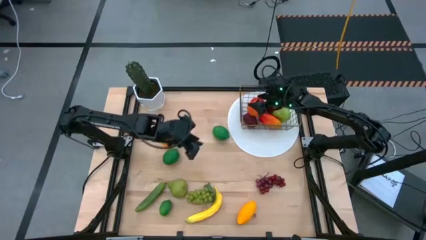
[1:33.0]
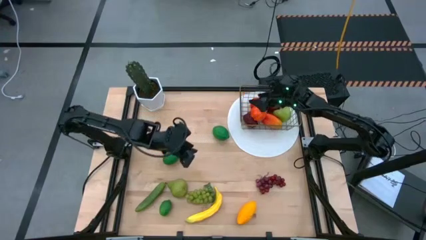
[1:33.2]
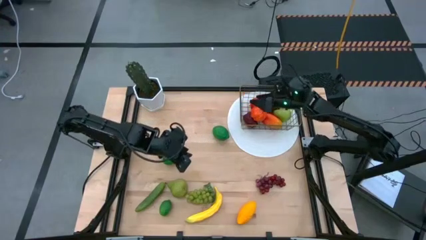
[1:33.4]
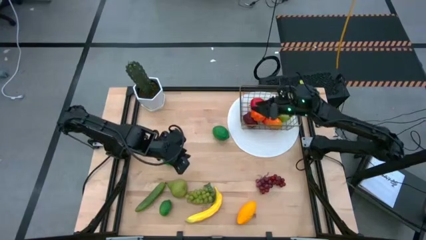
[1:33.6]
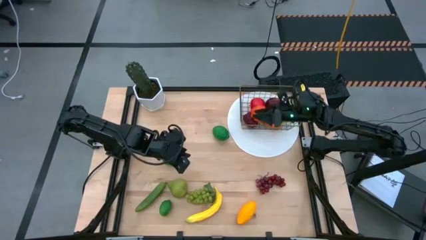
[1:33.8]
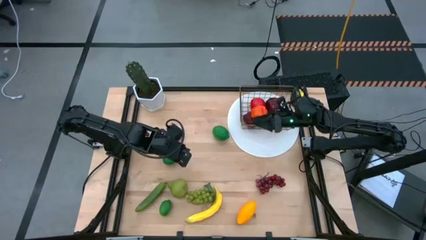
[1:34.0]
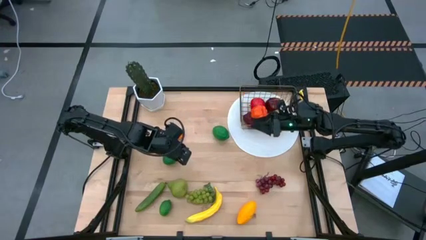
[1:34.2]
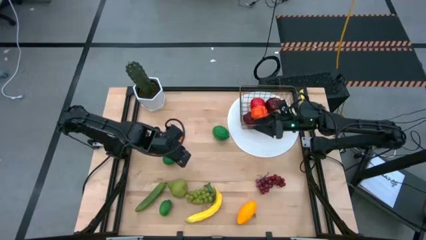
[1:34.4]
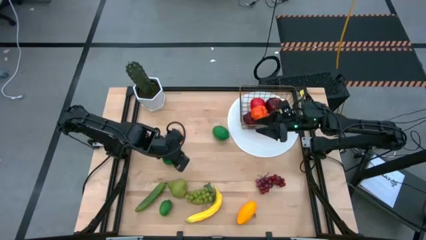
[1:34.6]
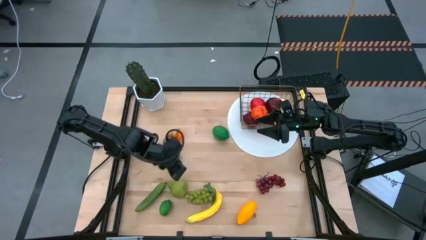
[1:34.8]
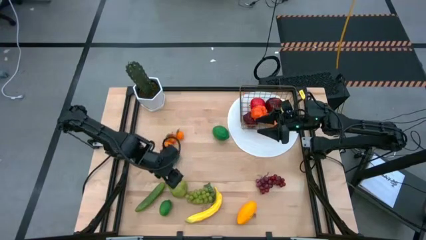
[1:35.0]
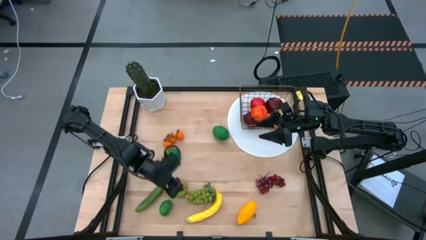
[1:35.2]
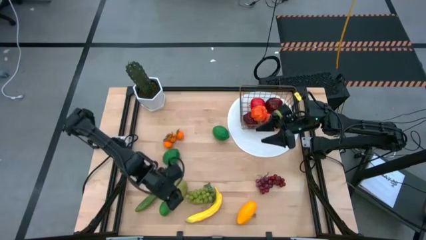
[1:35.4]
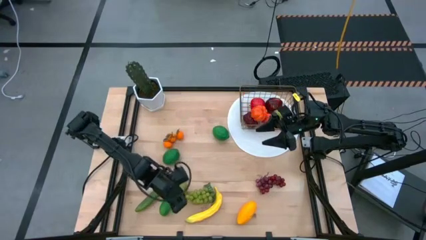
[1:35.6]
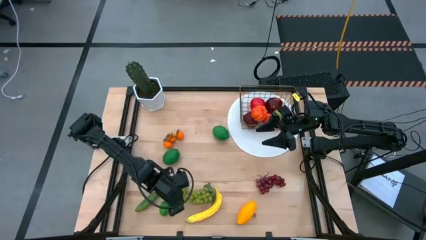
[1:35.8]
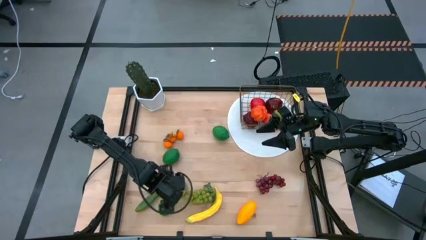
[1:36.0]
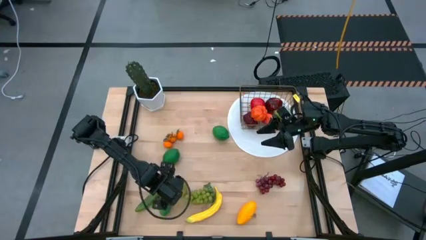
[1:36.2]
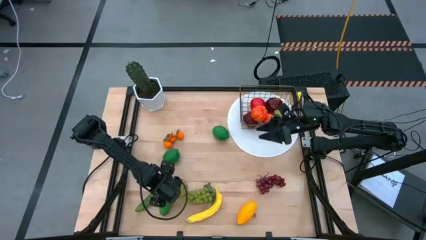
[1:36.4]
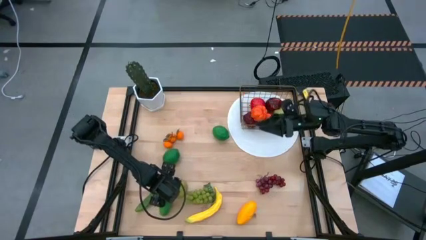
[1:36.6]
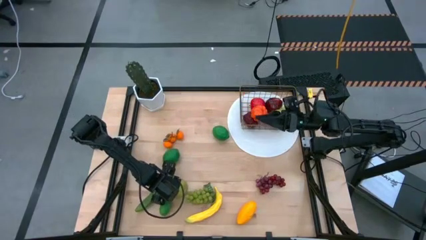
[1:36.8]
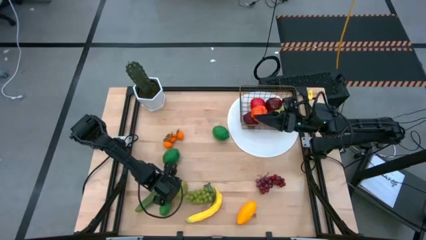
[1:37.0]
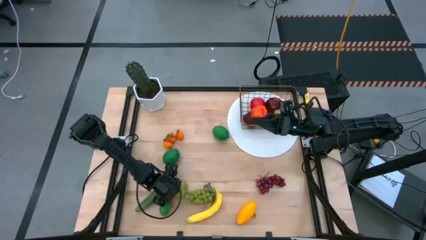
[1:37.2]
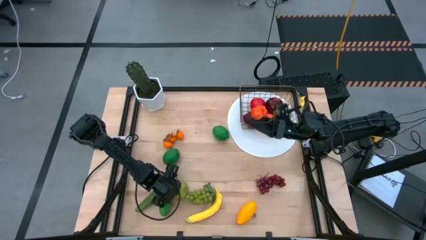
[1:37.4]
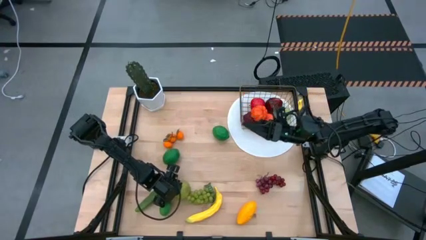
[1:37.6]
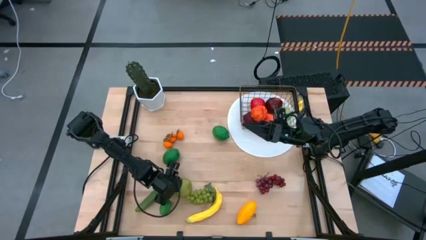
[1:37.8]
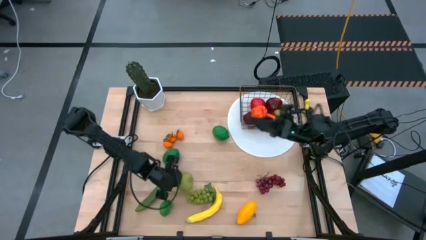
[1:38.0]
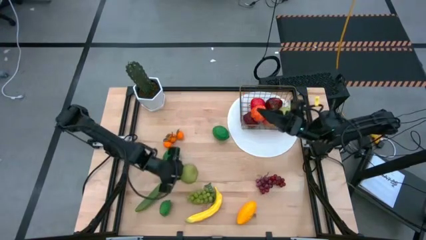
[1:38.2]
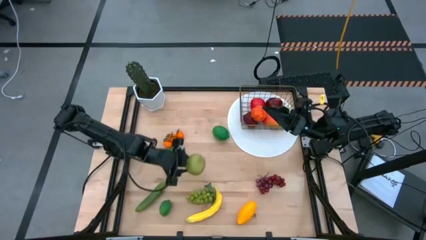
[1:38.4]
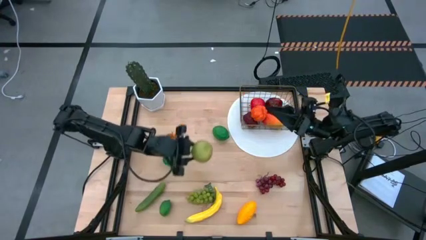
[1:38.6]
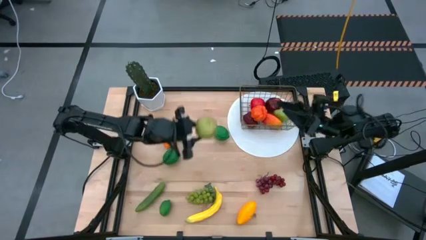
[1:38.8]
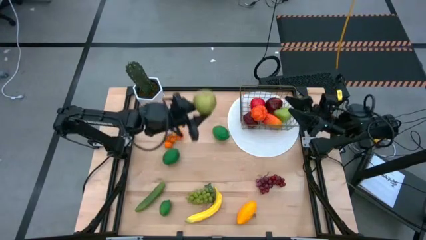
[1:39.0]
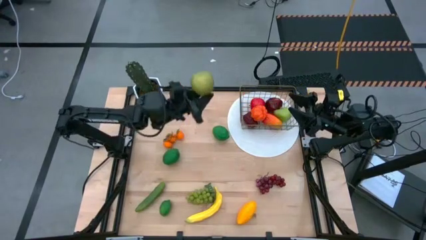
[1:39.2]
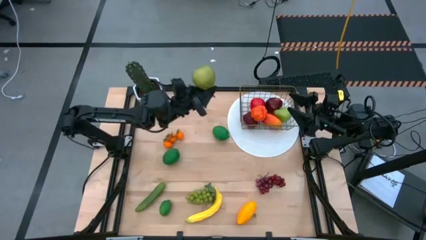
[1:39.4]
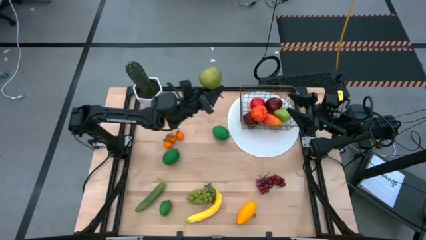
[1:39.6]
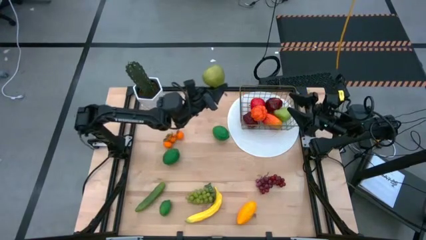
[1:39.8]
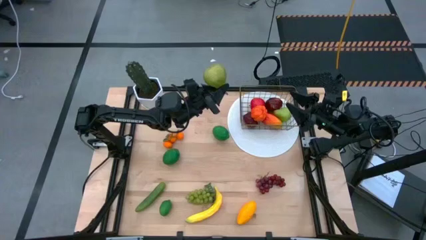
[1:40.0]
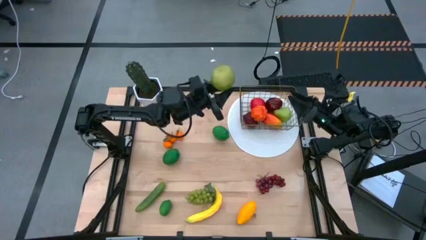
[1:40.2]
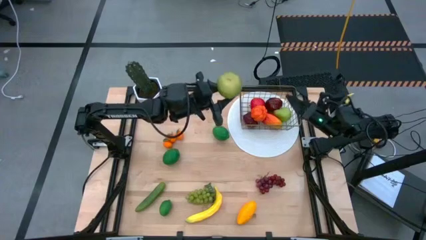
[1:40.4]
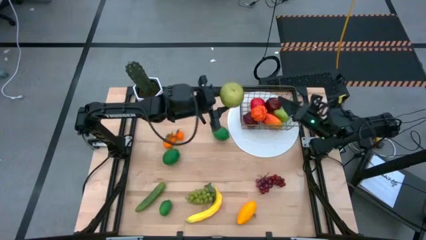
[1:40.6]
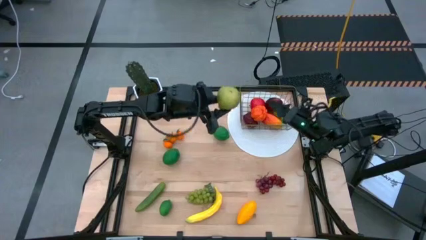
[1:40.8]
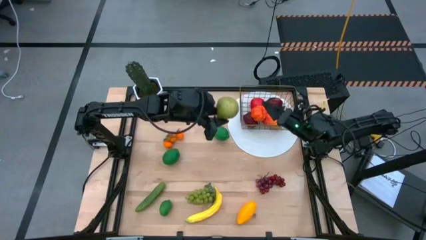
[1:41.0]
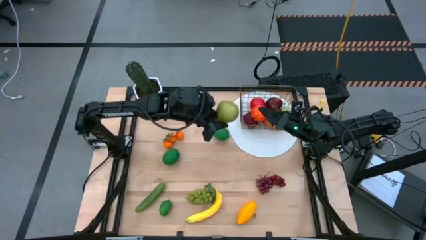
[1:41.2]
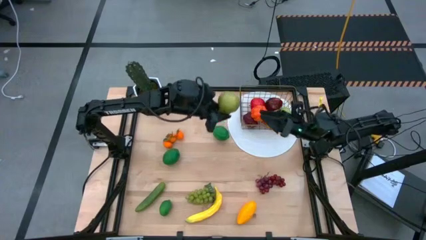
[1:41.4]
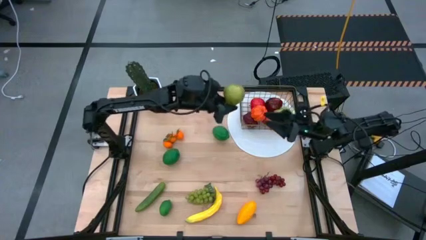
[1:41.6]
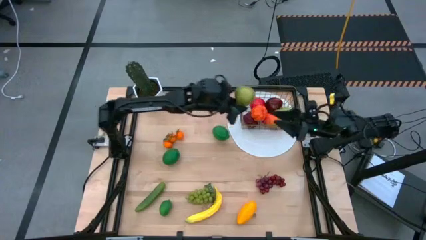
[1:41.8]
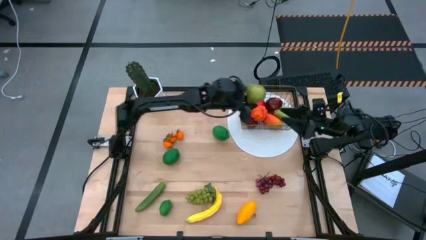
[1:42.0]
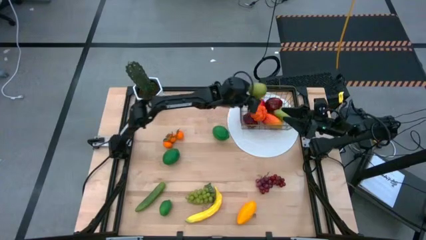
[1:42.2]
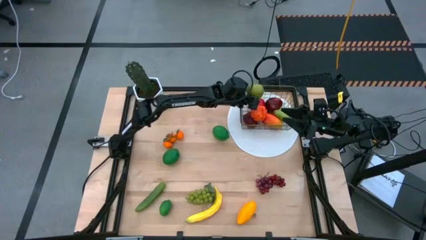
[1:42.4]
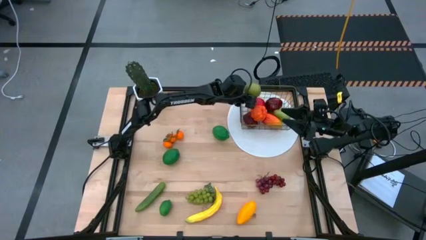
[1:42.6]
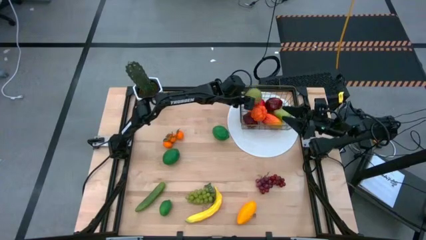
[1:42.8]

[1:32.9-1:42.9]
Task: Build produce basket
Put the green pear into the gold wire basket

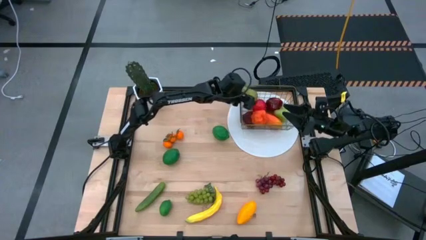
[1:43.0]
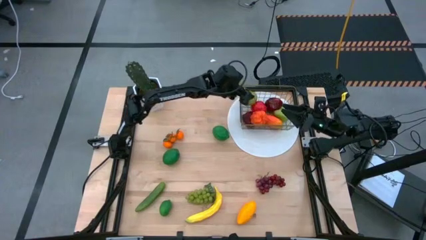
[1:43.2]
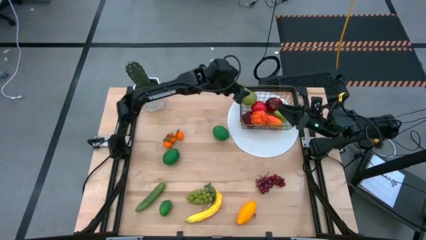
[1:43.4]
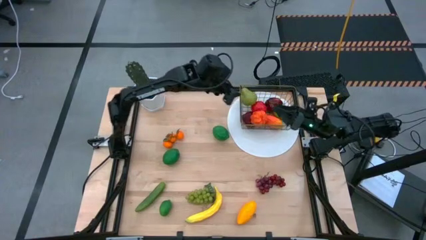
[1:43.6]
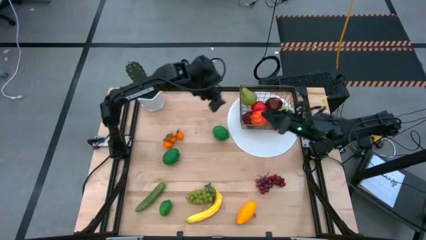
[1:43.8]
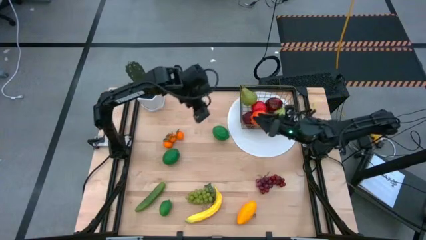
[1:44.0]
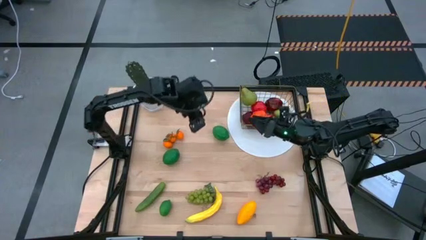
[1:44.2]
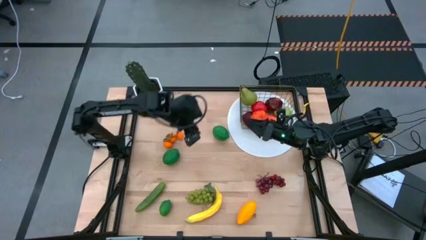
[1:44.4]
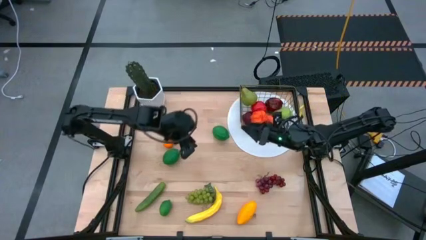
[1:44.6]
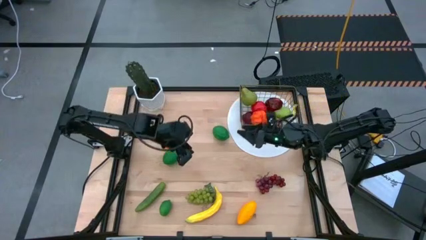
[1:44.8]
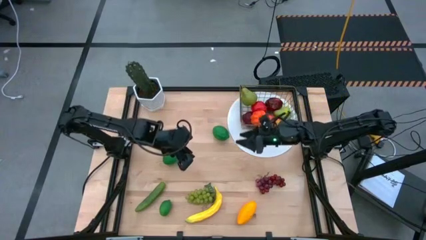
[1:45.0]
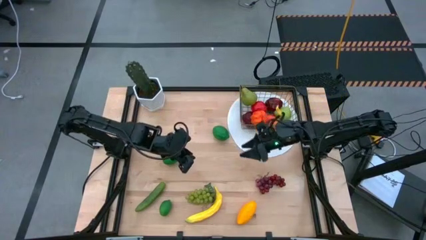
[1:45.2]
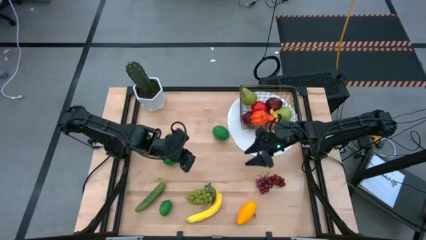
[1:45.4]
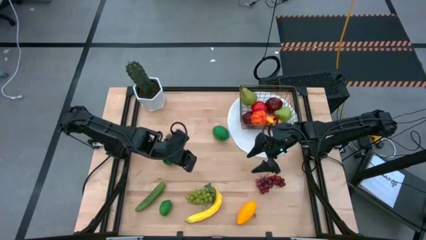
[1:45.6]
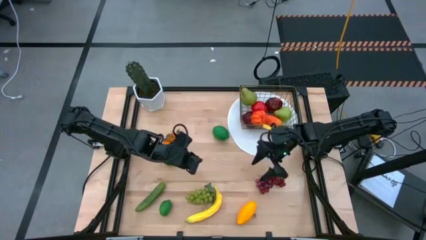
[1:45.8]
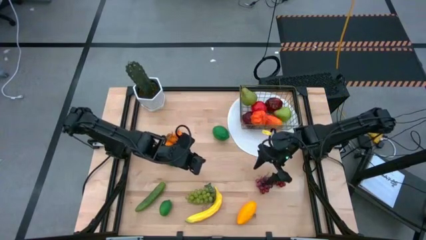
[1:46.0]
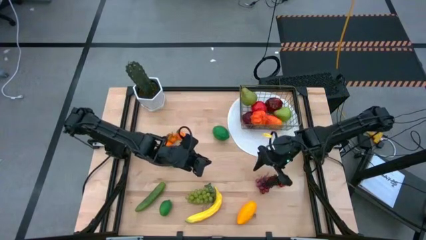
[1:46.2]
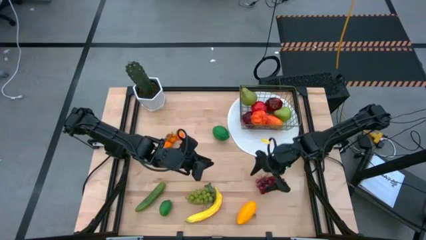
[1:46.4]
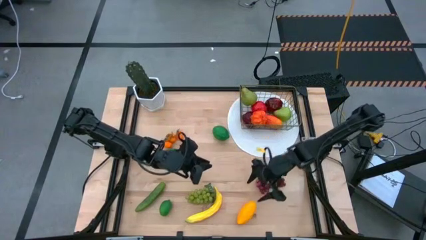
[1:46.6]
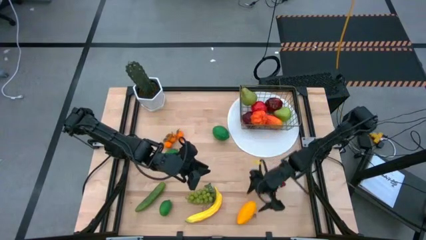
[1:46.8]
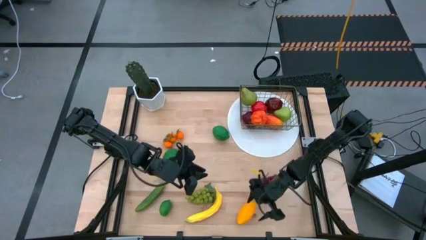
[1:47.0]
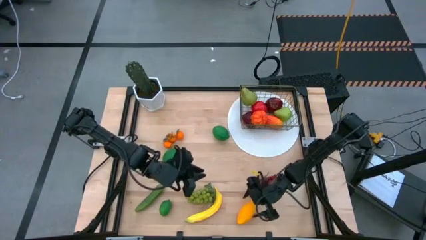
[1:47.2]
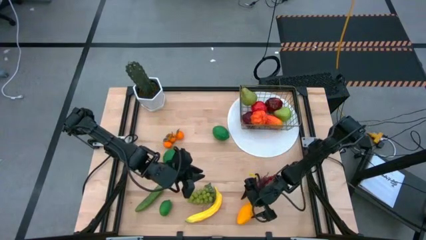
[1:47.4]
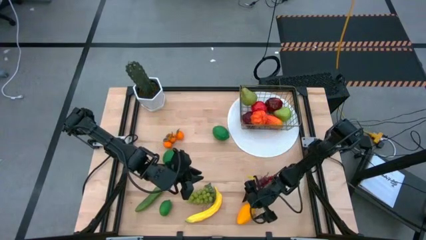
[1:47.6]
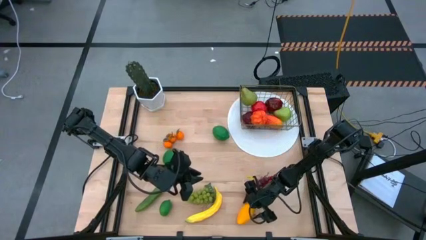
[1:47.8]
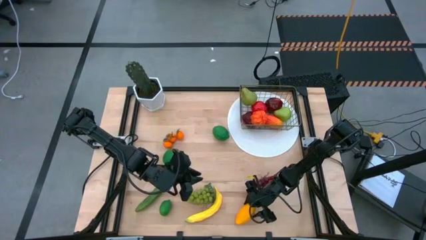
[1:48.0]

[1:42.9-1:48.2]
Put the mango into the gold wire basket
